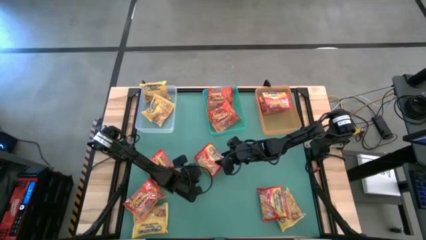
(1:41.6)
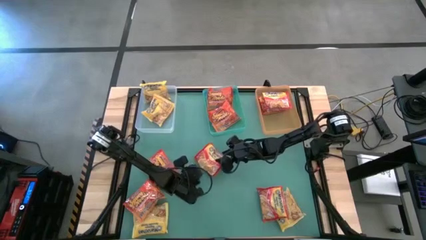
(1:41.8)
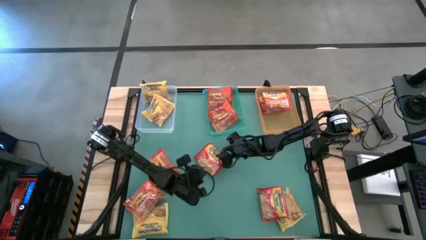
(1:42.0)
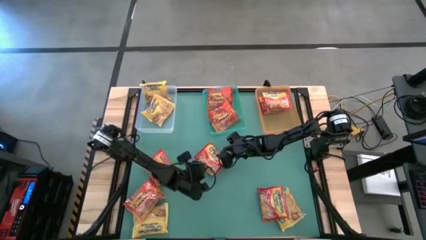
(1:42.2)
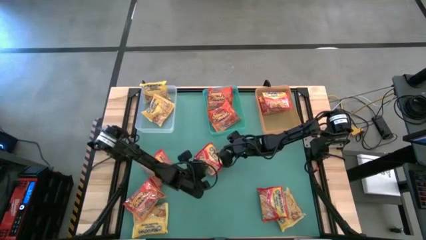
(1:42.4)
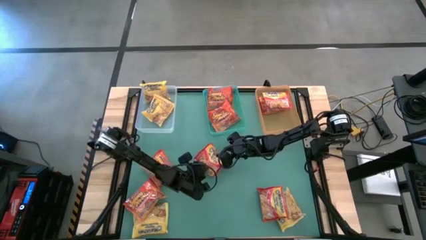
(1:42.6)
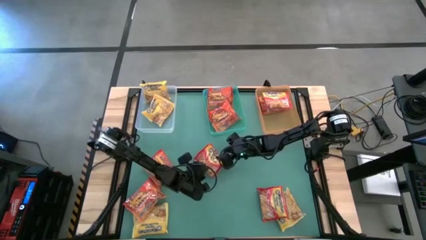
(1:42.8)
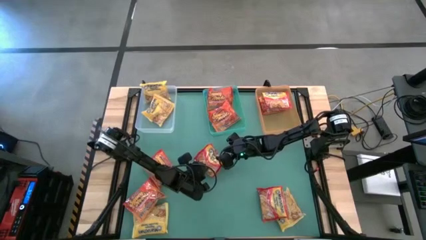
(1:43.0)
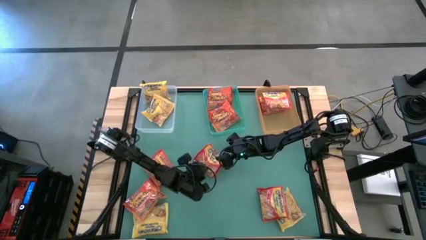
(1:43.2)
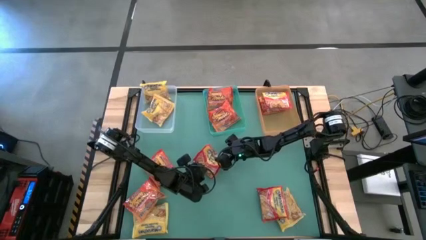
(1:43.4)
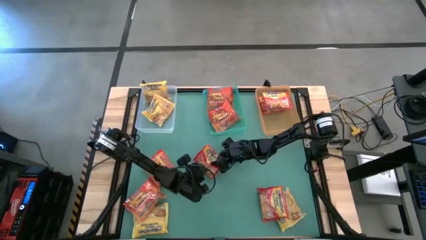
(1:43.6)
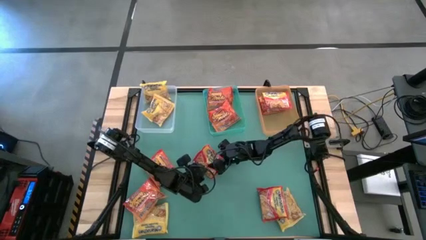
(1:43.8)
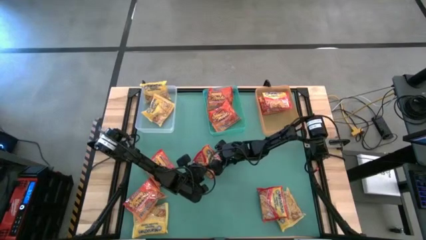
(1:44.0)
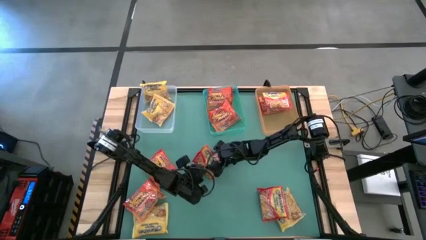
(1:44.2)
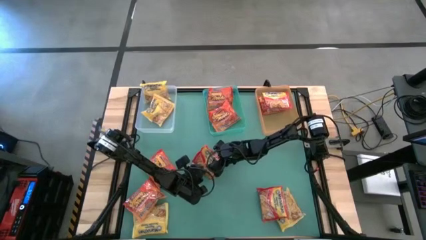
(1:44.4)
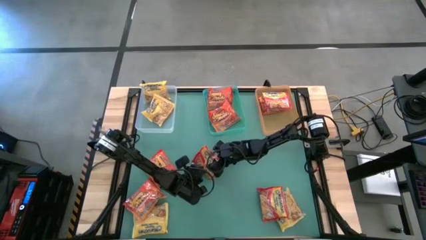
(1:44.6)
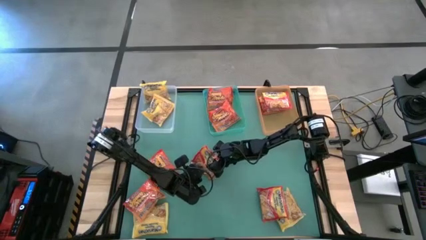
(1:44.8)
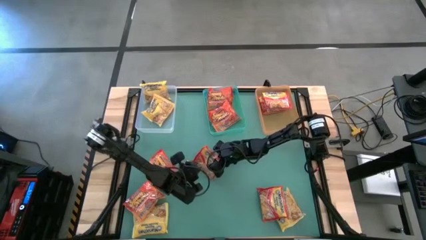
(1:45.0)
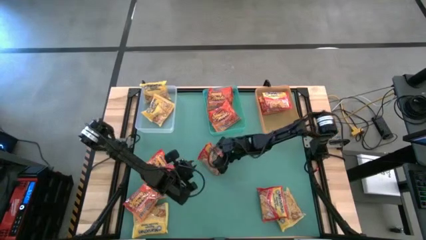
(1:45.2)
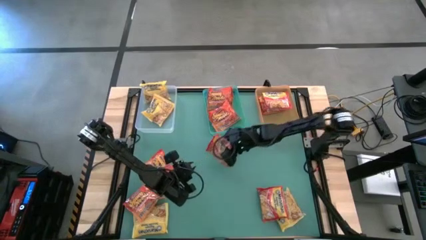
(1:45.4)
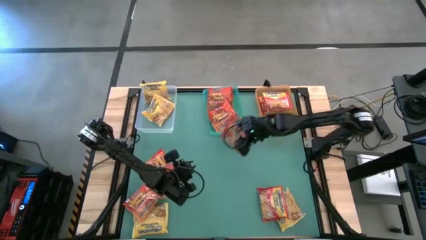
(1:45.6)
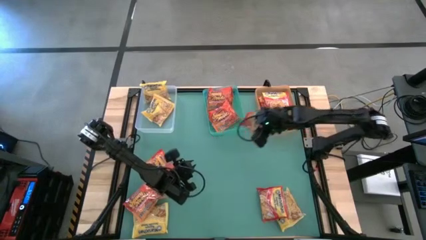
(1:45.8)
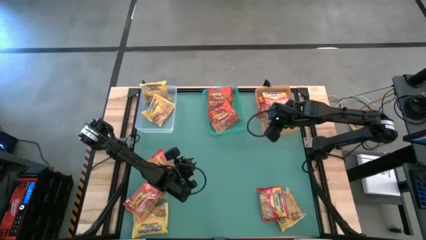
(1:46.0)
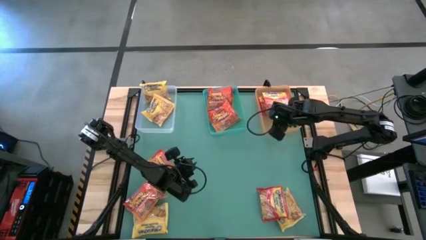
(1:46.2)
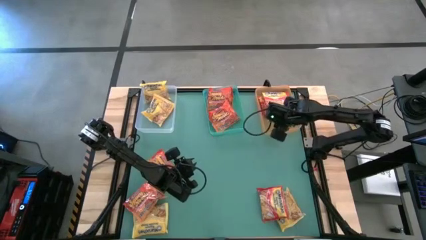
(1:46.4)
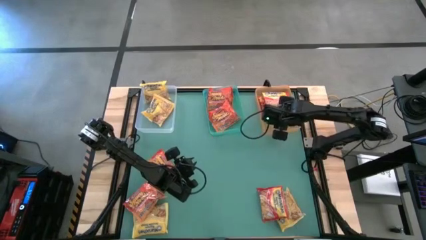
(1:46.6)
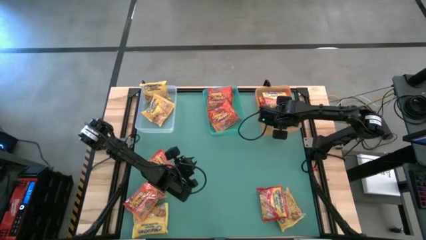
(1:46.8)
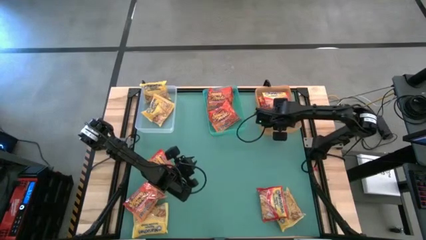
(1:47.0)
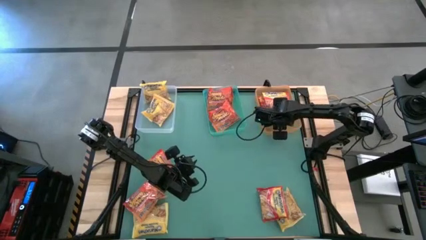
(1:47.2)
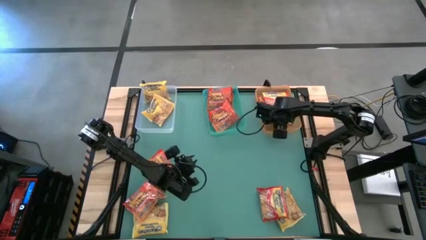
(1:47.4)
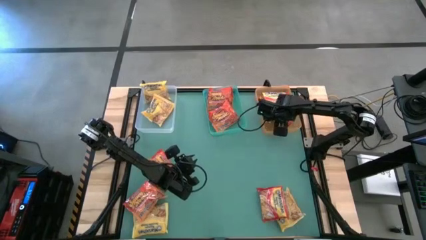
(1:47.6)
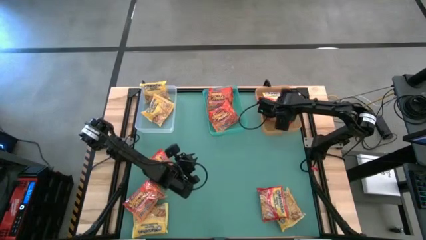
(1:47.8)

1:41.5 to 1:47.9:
Task: Sort Maruchan noodles
Put the orange noodle pack into the orange bin

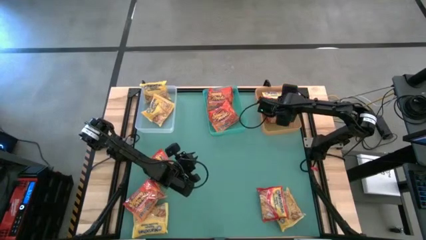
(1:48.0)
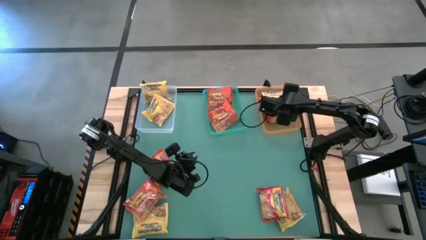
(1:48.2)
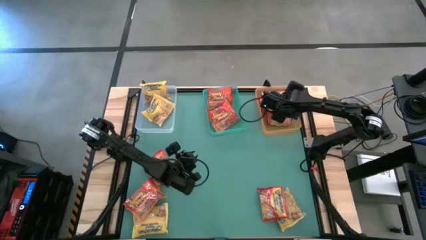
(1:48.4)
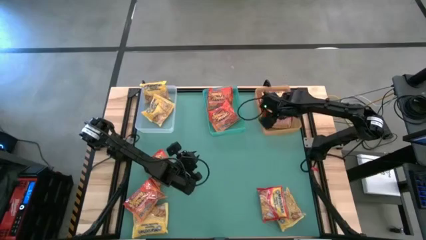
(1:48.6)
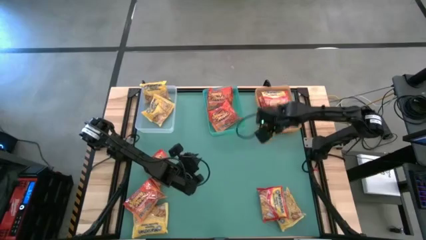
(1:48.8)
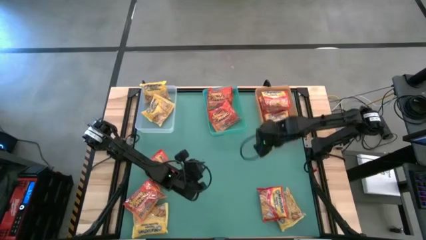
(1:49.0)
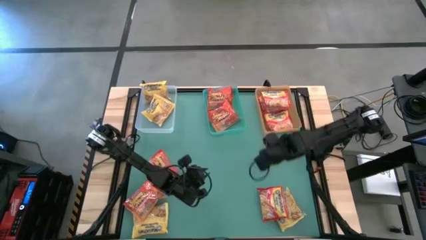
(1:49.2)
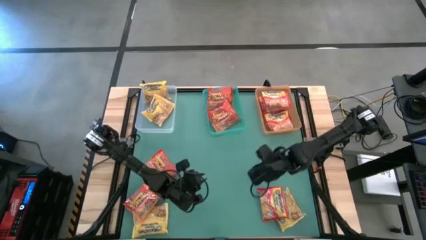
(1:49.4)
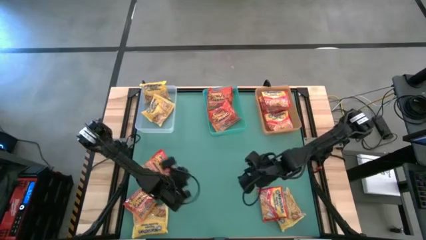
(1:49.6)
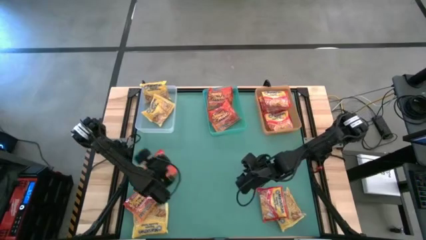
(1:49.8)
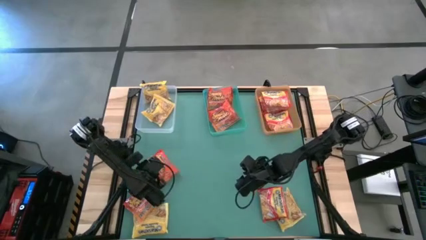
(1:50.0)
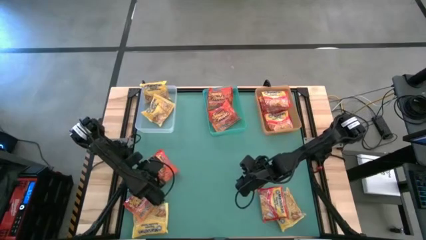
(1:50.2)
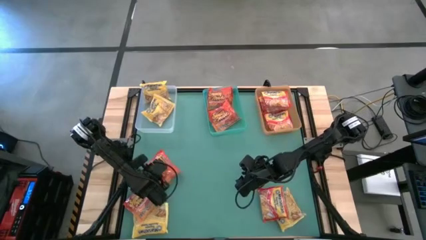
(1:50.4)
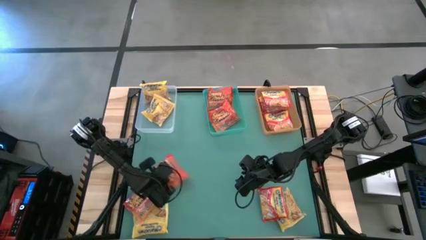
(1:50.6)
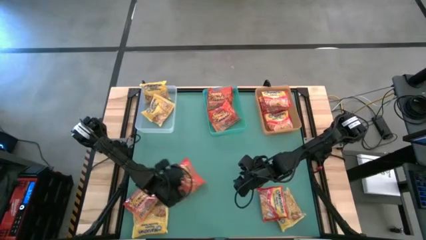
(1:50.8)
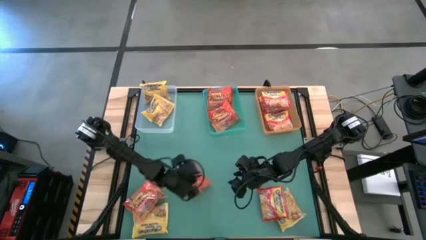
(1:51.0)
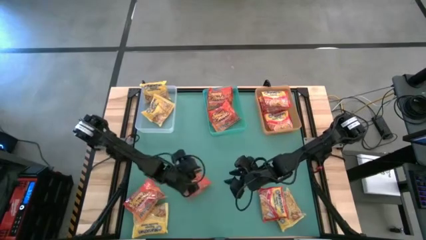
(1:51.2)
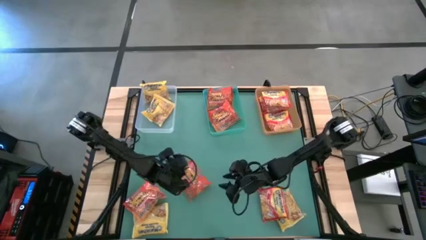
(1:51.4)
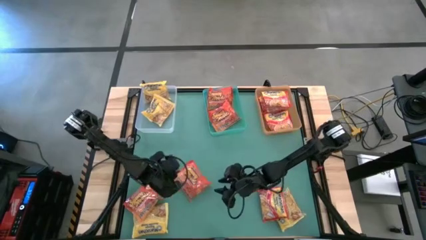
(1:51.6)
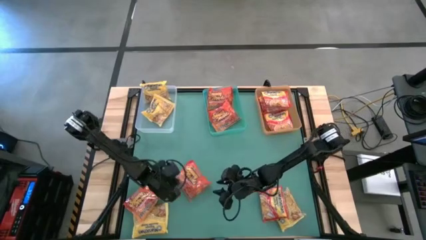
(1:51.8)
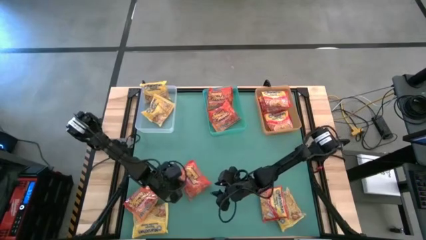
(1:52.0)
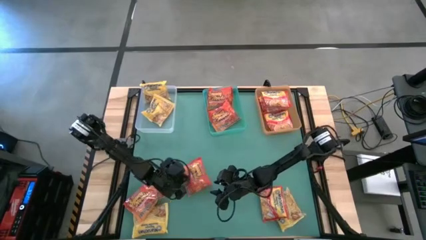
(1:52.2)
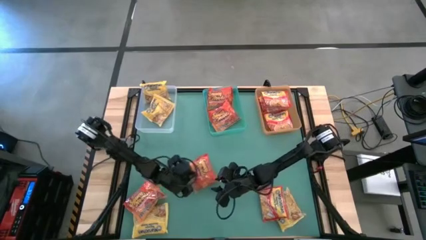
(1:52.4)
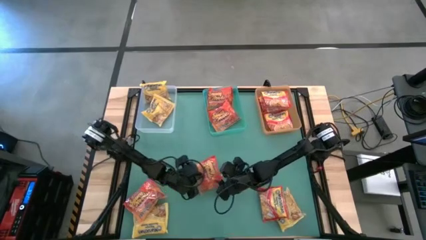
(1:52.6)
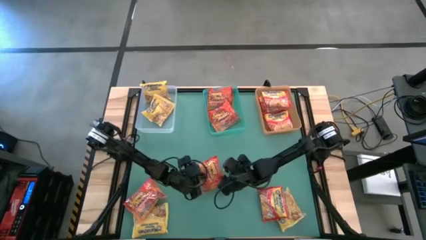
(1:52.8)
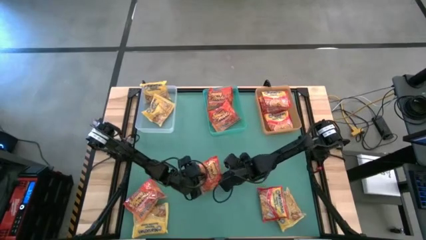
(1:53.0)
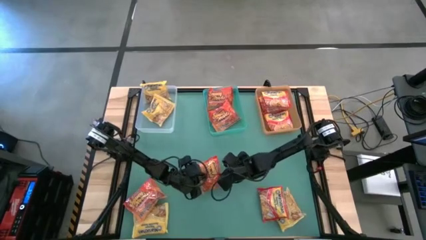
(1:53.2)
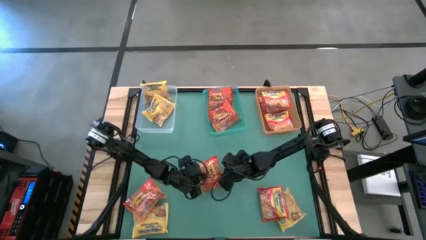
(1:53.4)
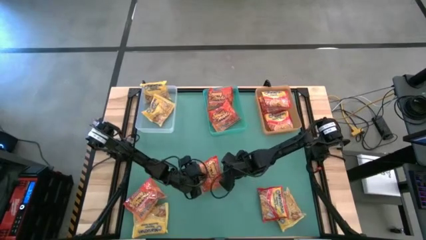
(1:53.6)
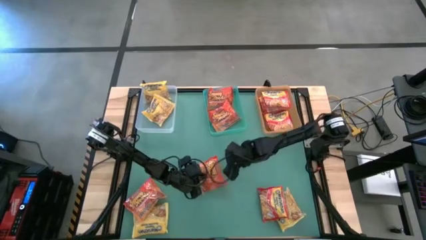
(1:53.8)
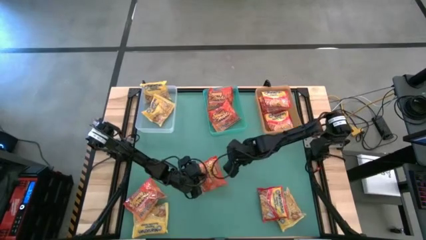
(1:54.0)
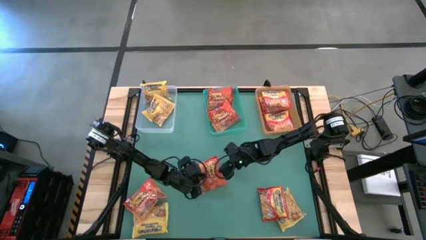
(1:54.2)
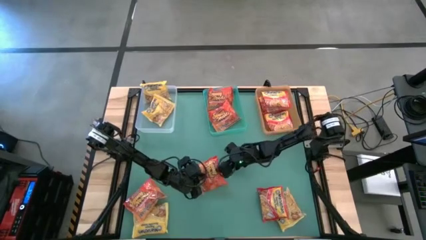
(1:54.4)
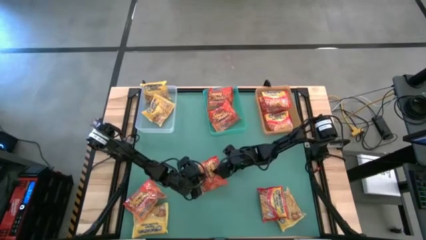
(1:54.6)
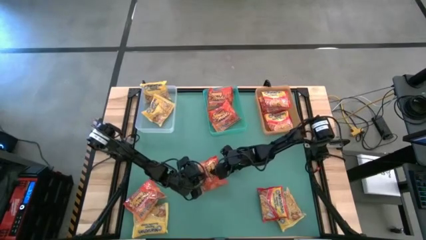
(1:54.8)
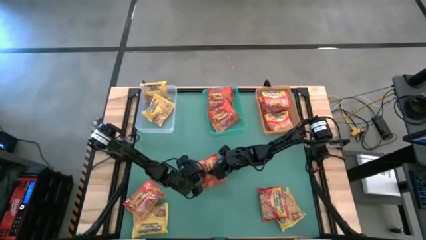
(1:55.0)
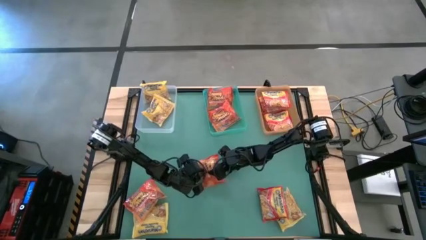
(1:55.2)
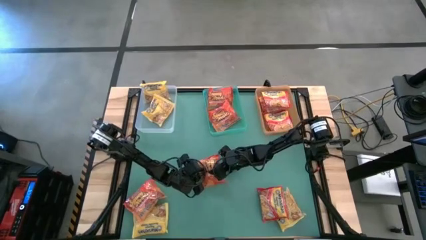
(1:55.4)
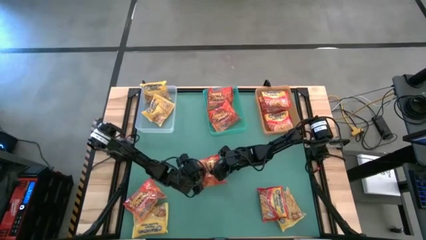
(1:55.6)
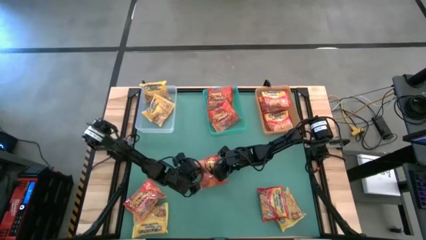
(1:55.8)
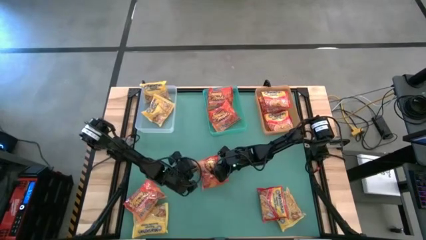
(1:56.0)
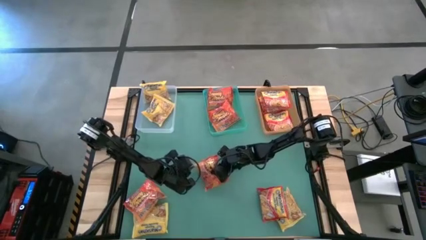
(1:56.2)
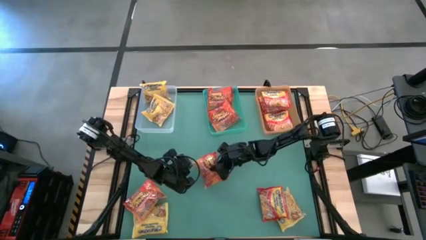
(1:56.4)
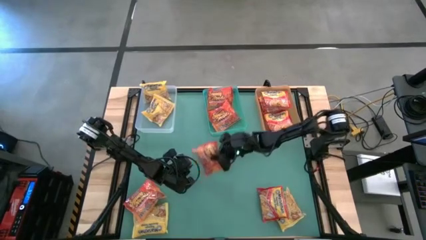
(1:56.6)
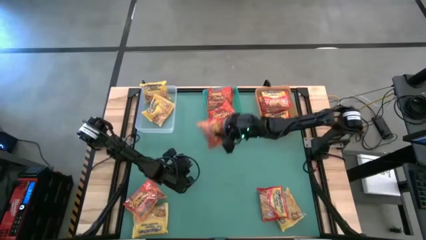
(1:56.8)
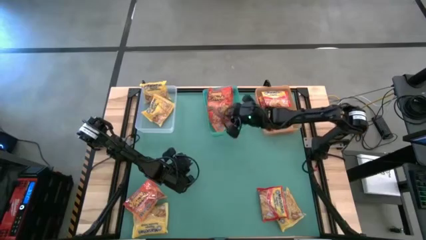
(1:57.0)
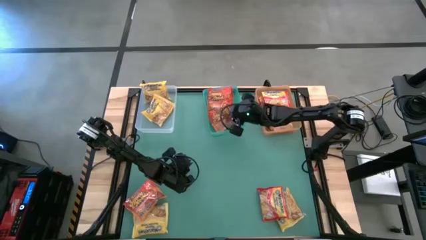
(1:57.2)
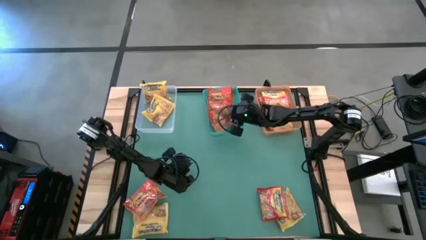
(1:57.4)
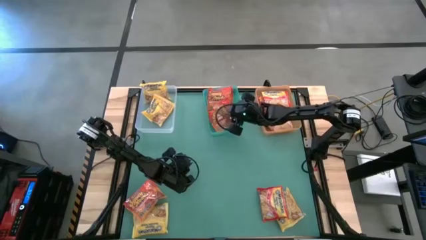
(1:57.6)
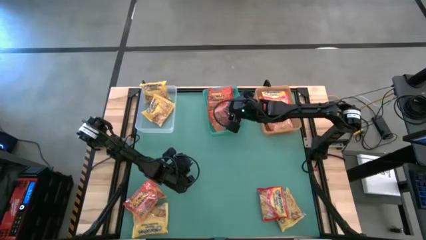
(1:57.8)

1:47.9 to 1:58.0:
Put the red noodle pack into the green bin

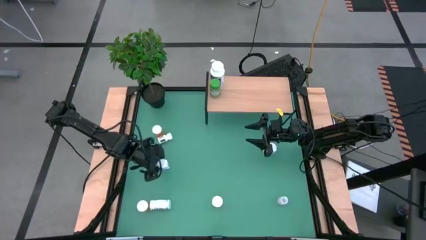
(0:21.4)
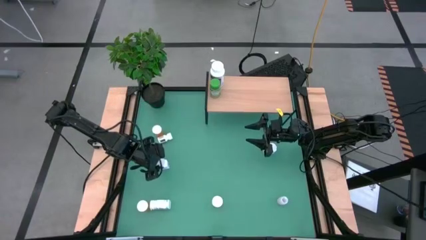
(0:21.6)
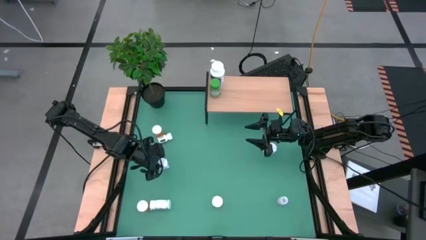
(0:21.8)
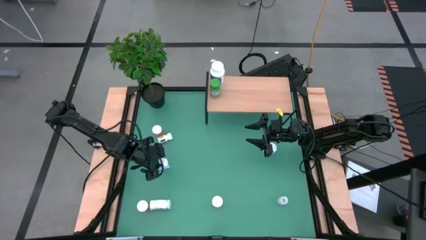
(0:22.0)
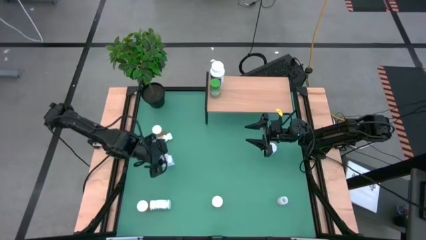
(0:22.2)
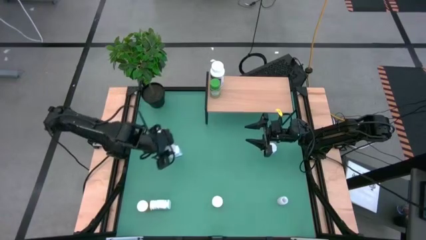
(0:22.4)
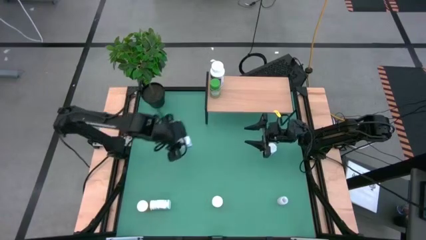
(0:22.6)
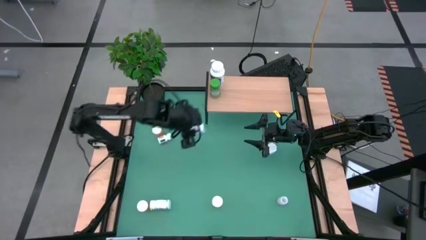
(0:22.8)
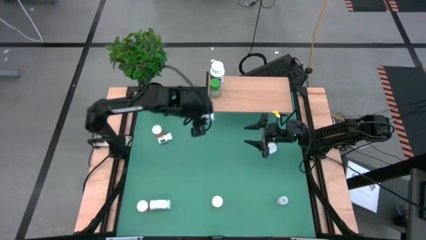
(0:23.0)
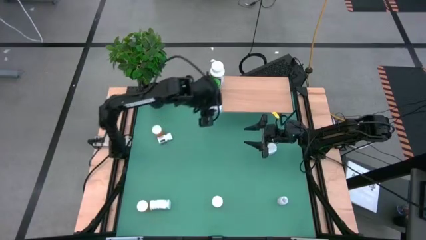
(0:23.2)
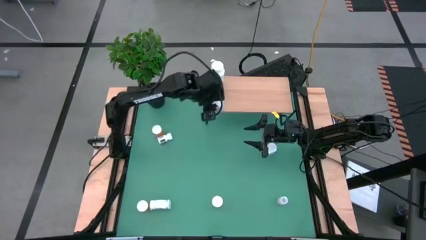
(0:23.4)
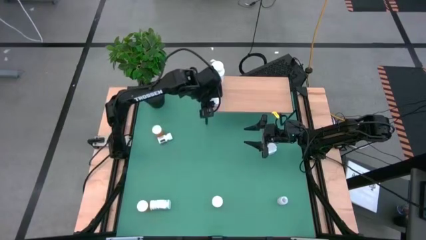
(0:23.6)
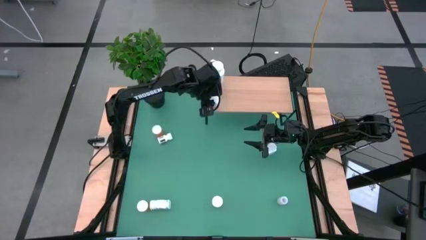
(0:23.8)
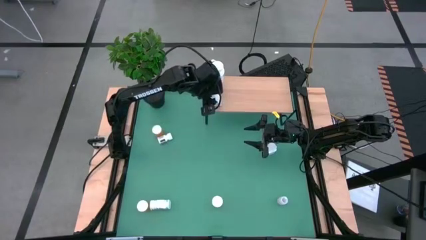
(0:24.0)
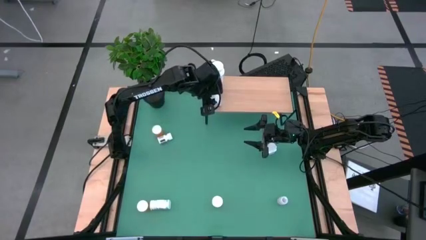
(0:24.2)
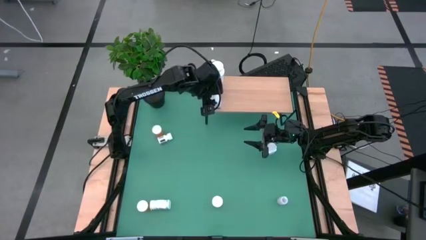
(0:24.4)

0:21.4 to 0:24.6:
Task: Pick and place medicine bottles onto shelf by color
Put the middle white blue medicine bottle on the shelf
